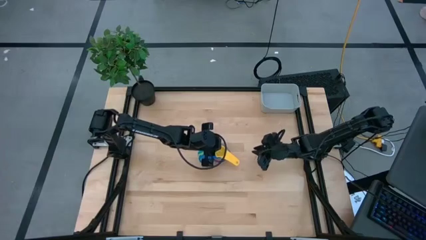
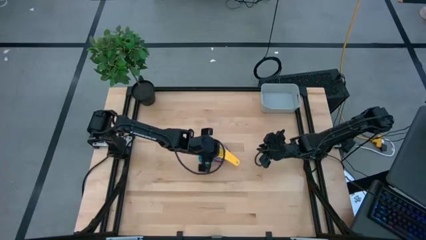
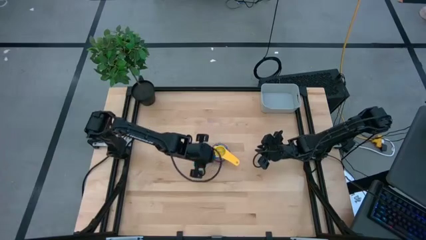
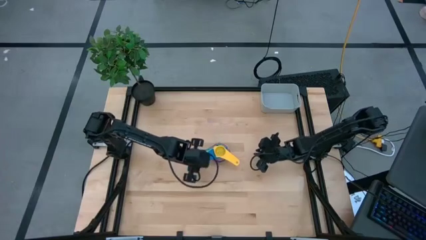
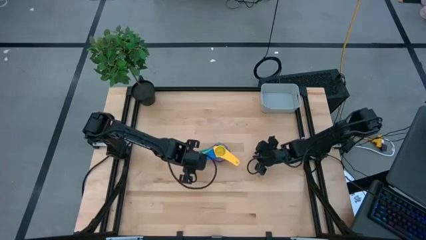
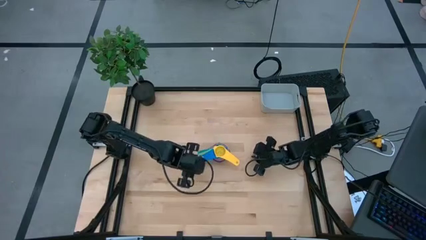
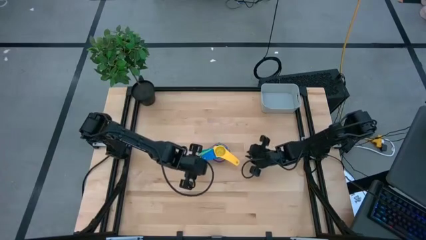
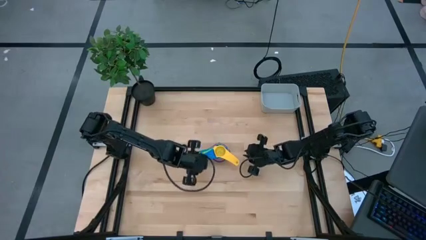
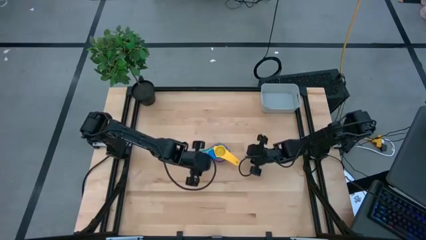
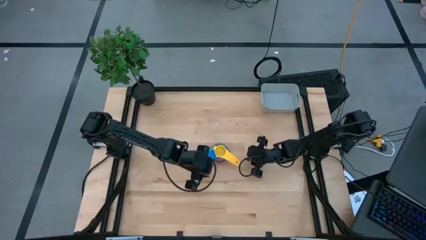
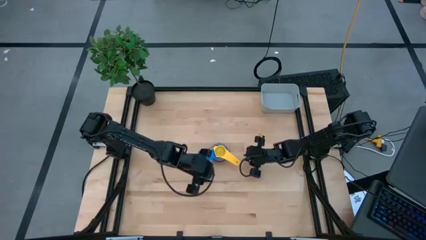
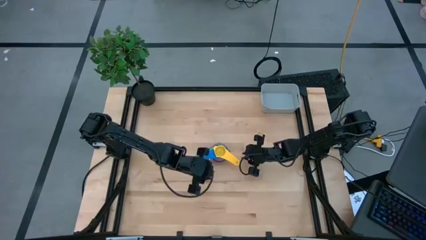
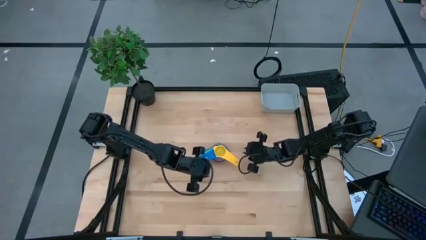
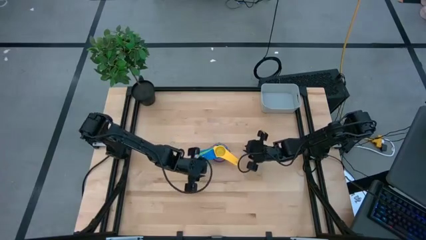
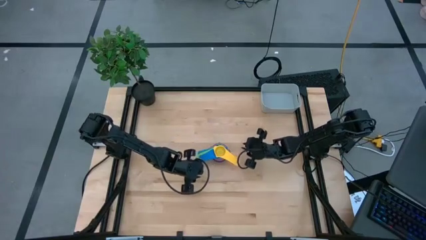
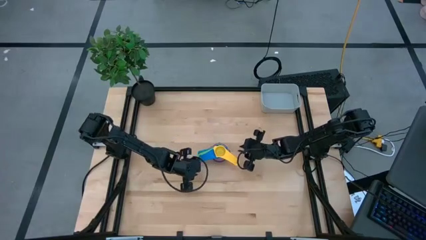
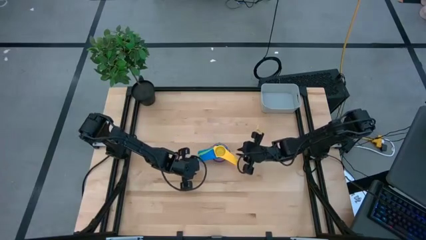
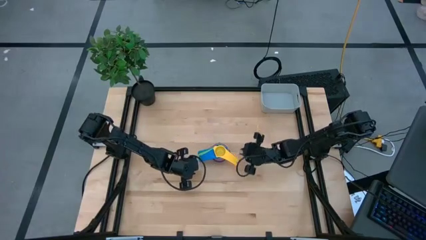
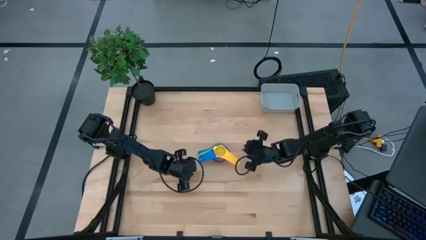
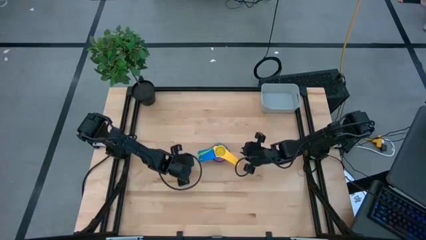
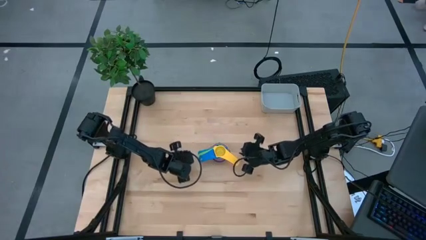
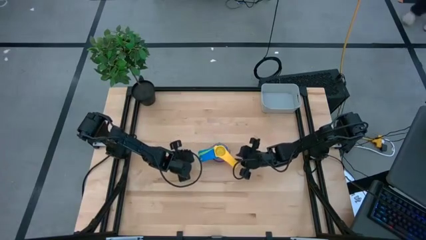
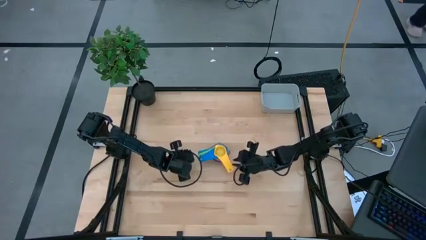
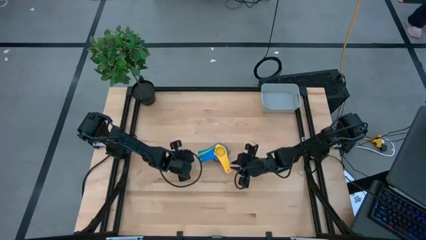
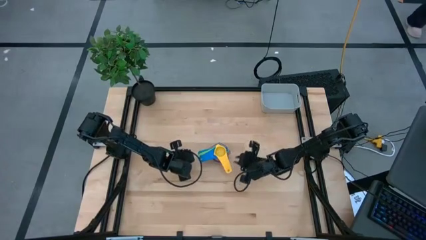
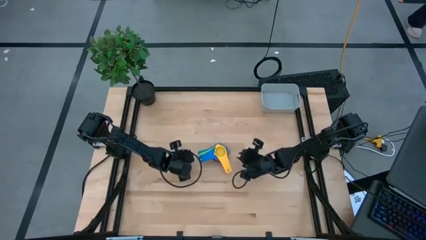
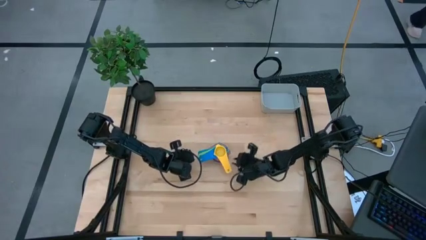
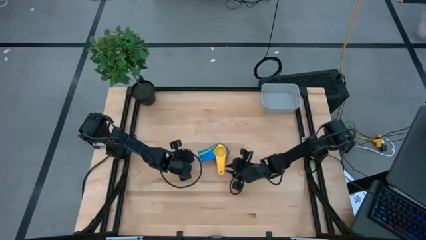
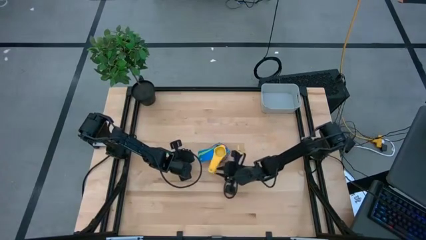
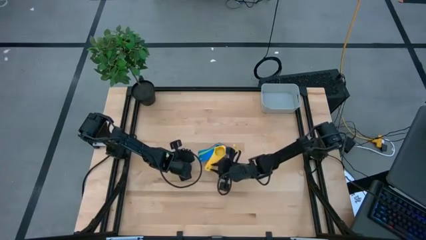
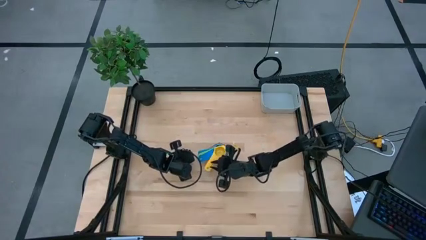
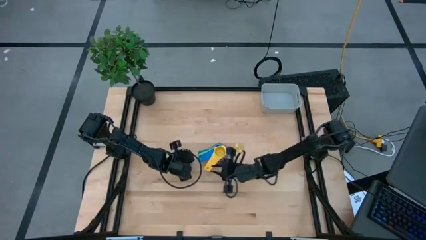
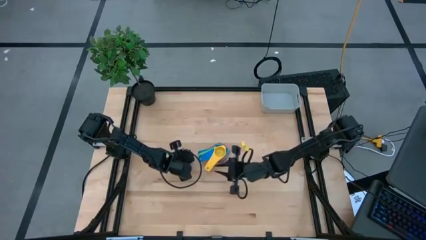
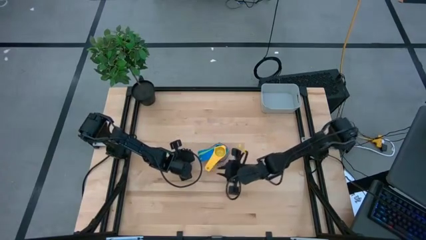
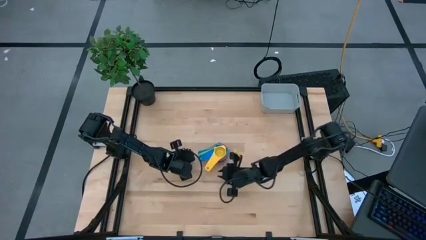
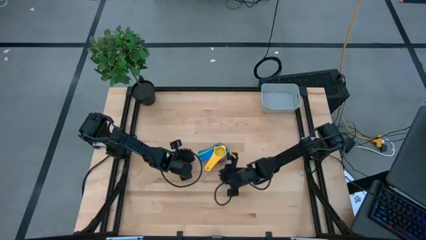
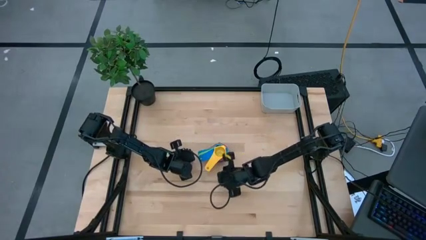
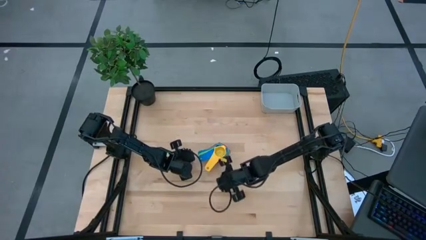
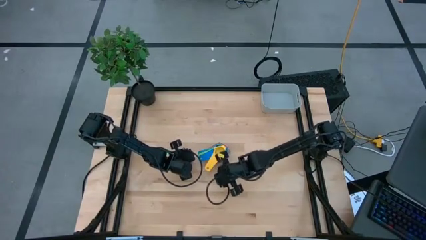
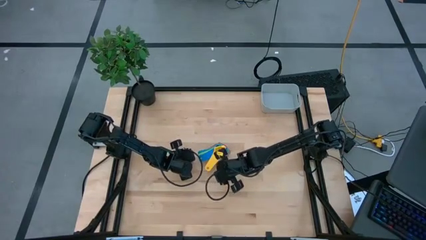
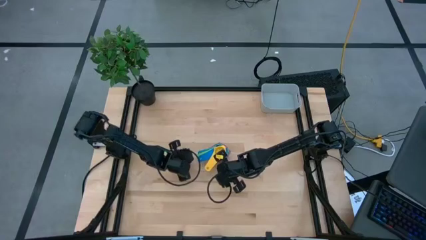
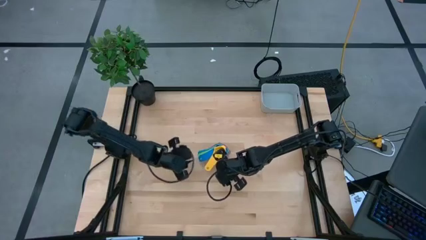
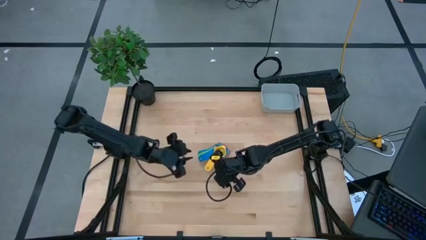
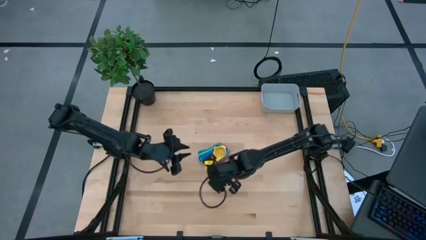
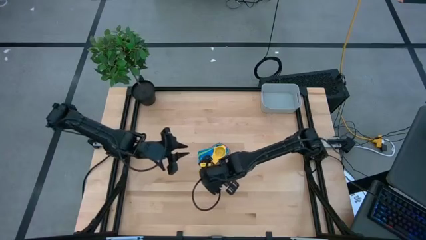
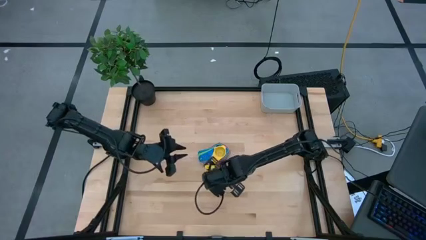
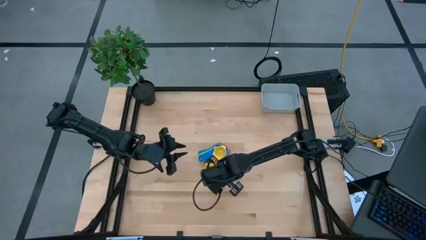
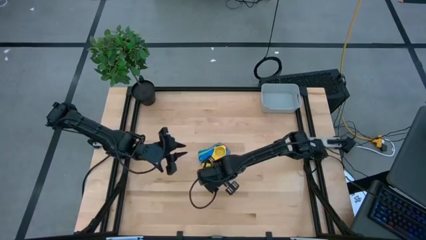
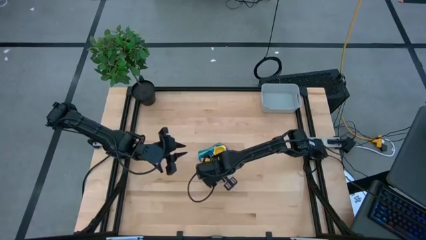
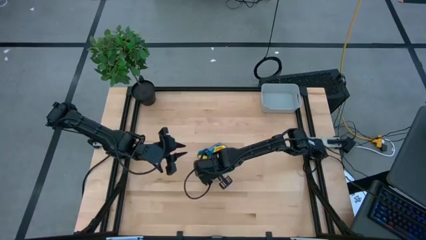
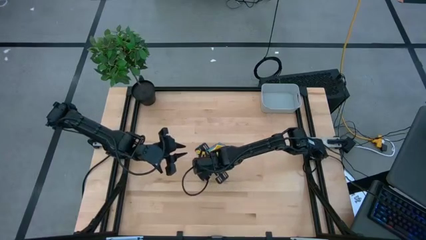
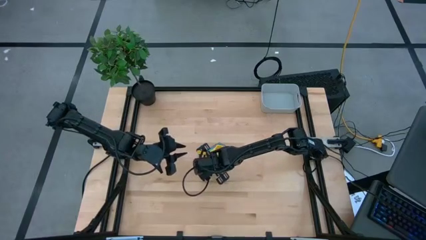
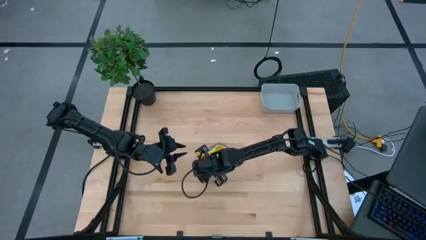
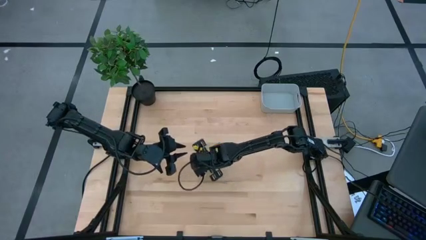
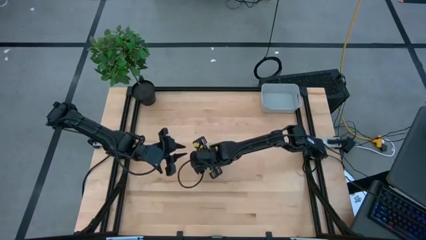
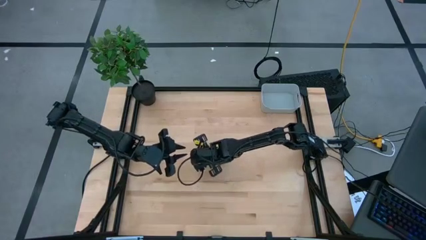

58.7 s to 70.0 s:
Task: Nest measuring cups in basket
Stack the yellow measuring cup on top of the blue measuring cup

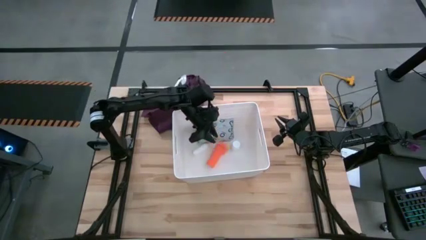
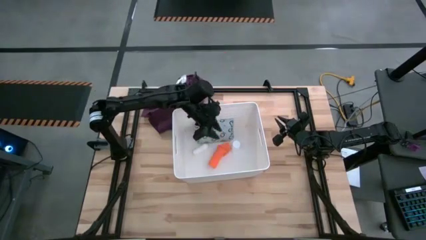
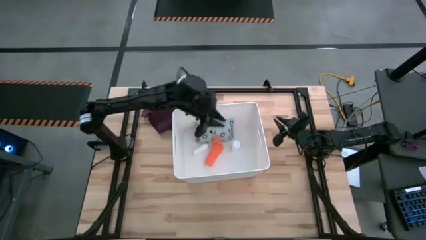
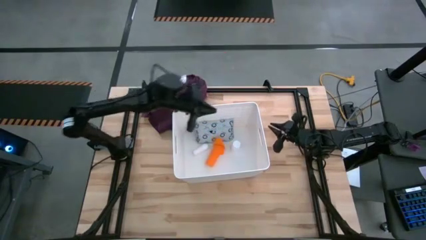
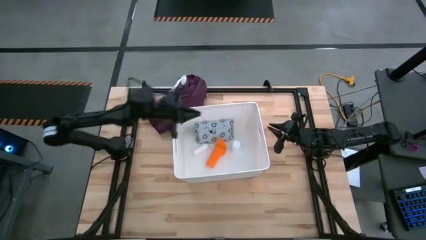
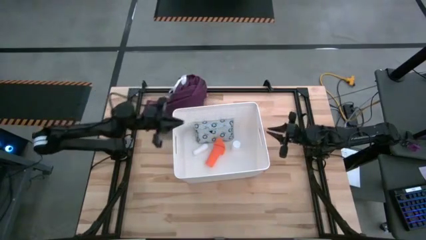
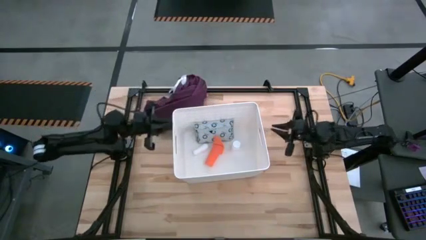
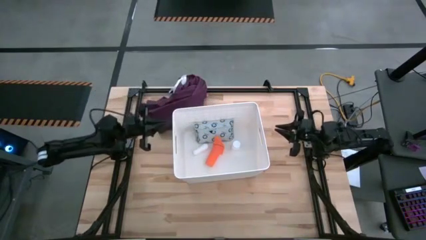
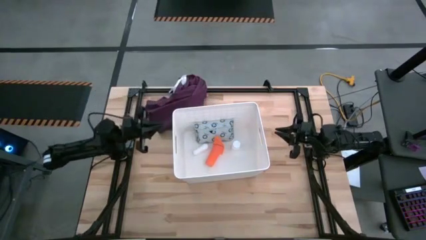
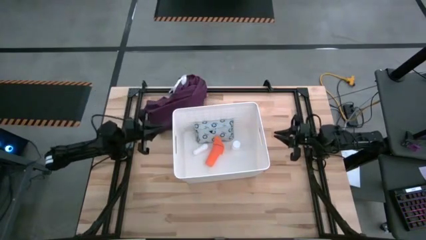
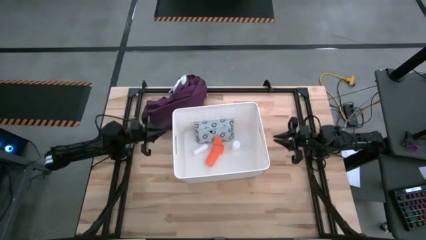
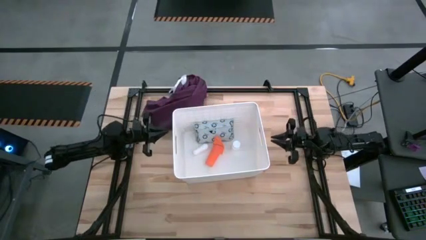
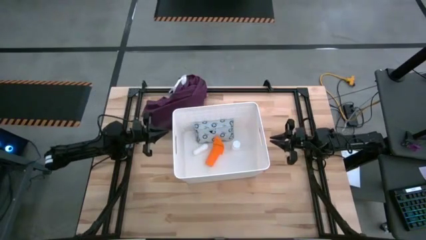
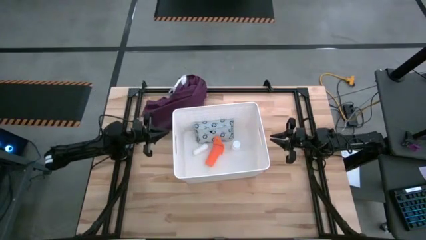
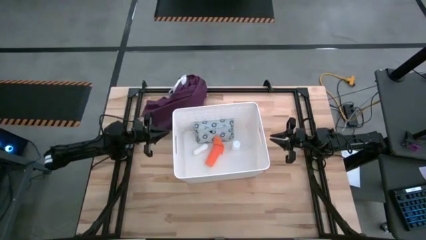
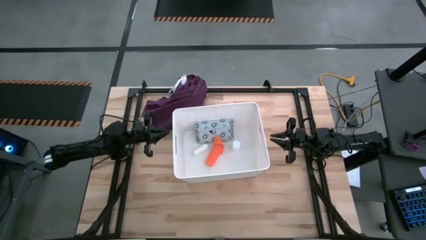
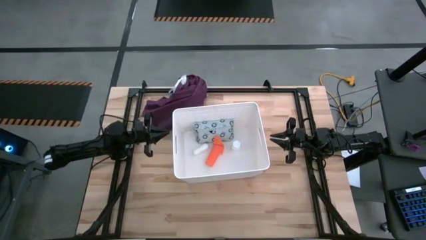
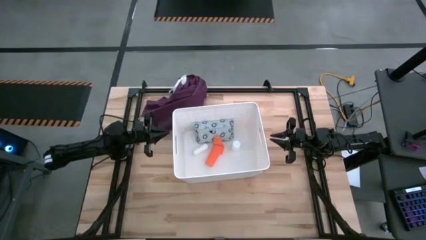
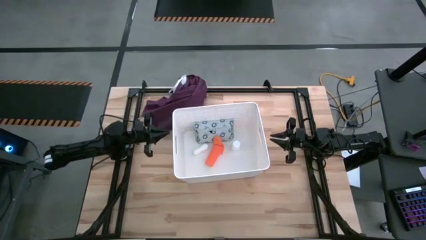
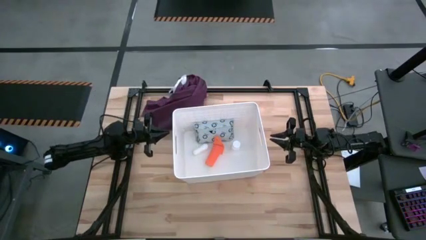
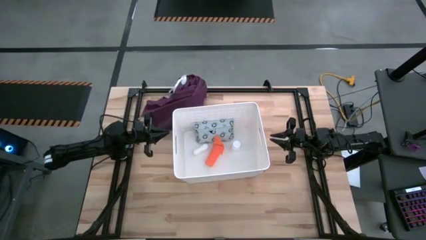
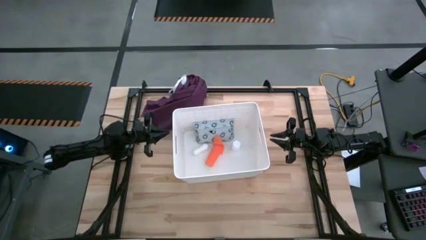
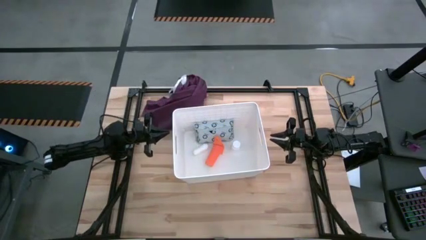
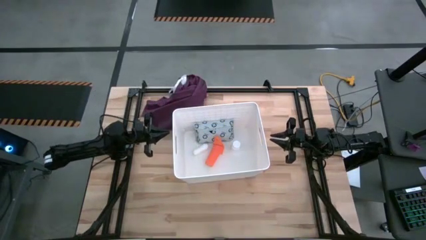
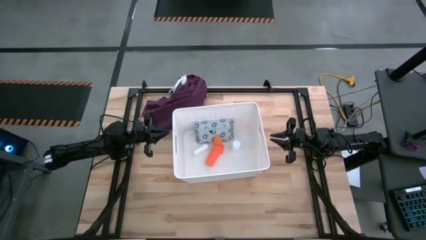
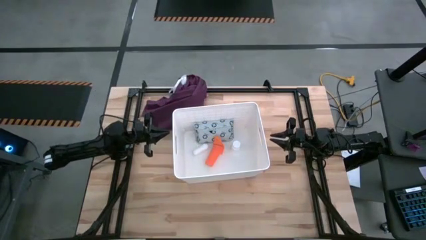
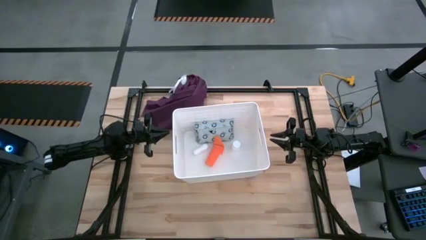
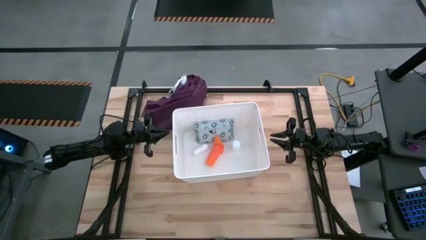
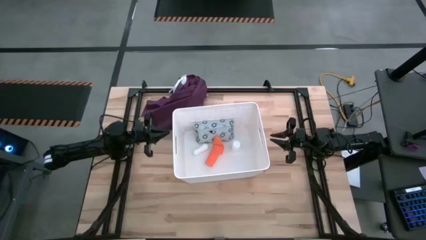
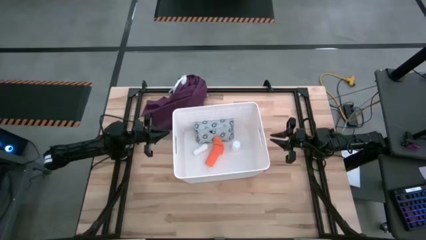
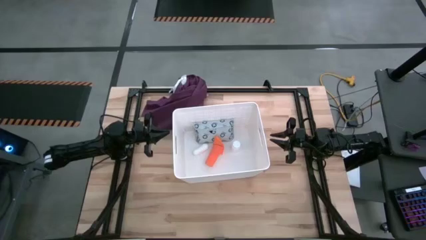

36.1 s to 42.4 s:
Task: Pick & place medical supplies in basket/bin
Return to Home Position
